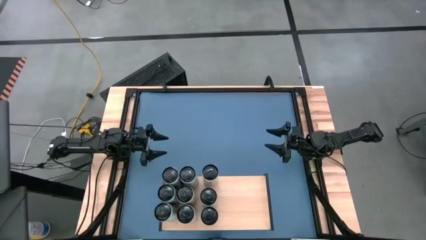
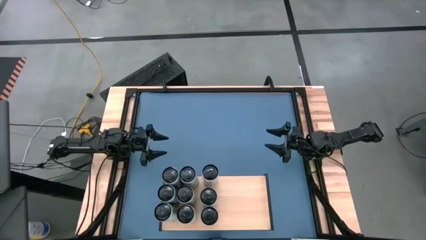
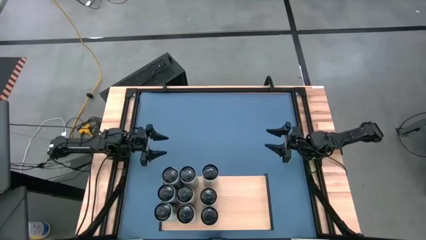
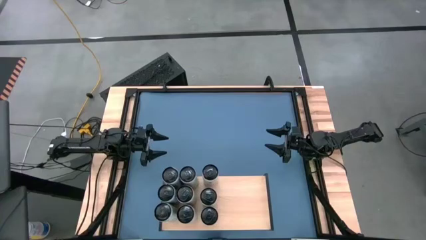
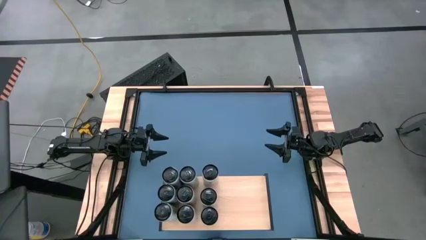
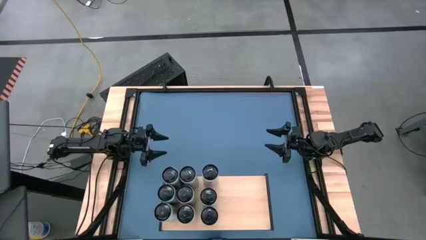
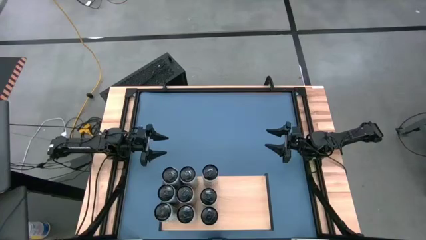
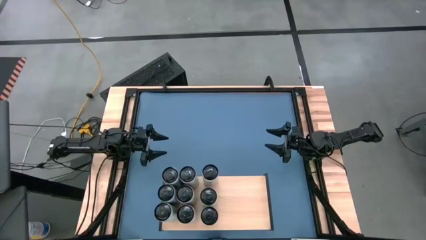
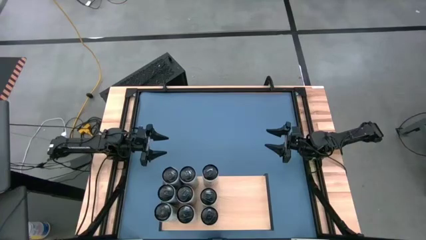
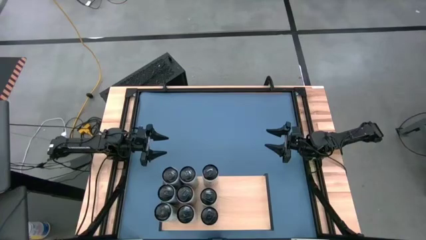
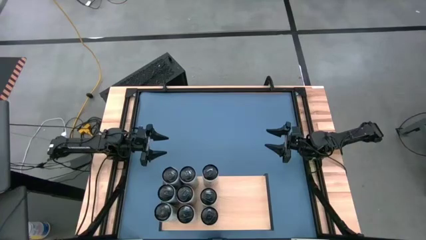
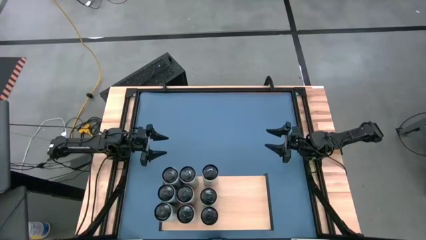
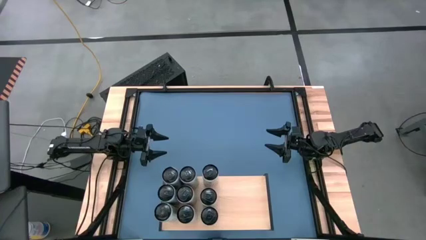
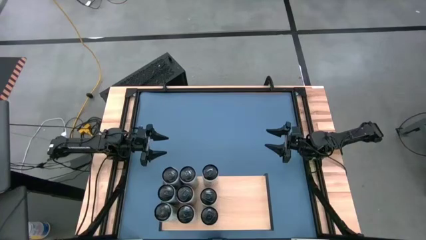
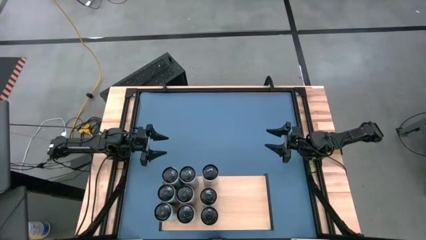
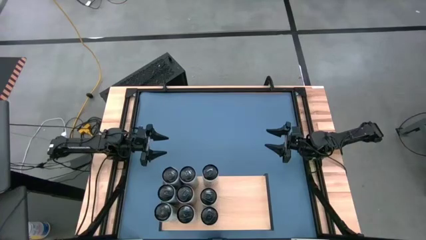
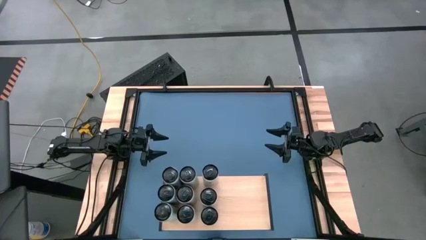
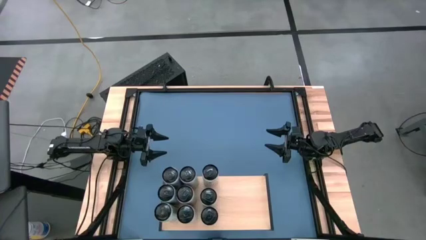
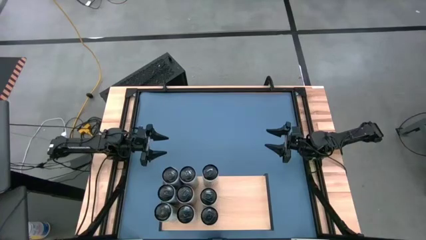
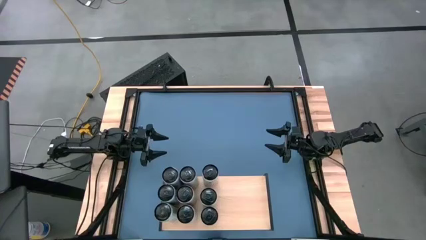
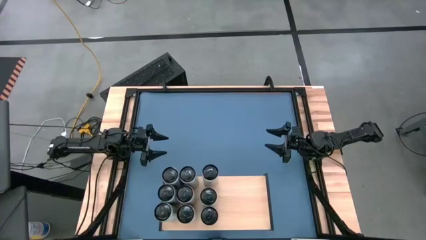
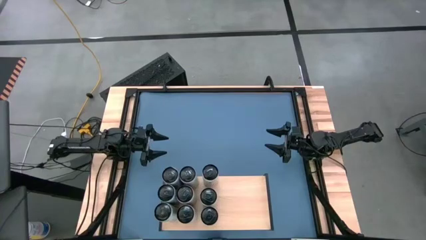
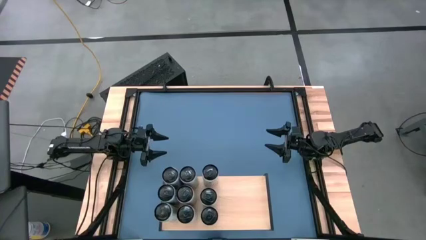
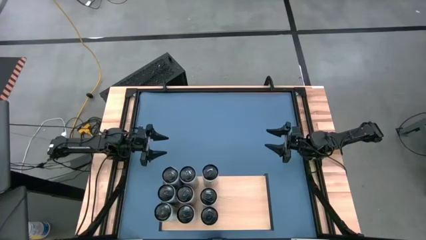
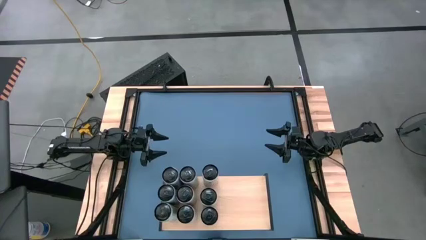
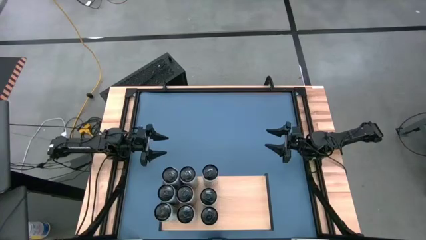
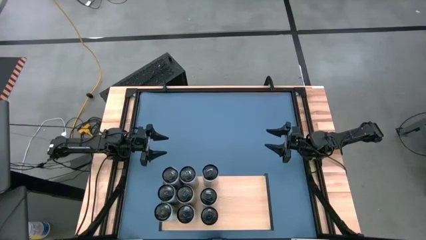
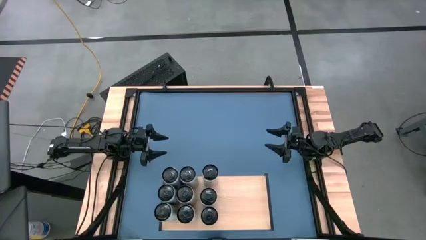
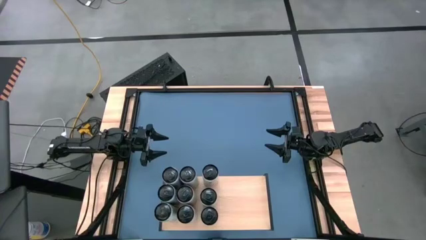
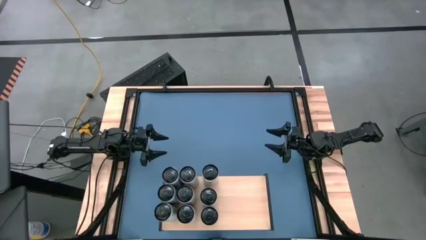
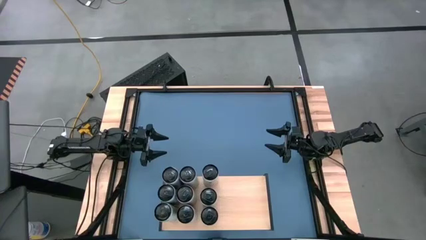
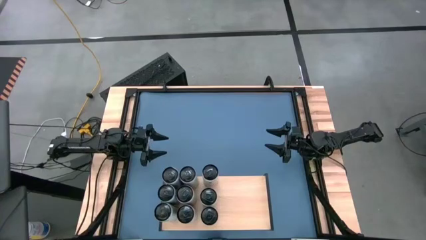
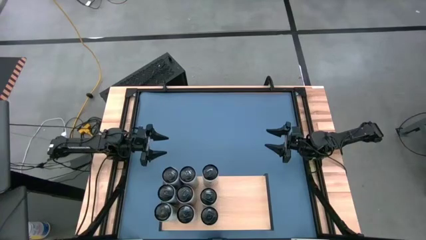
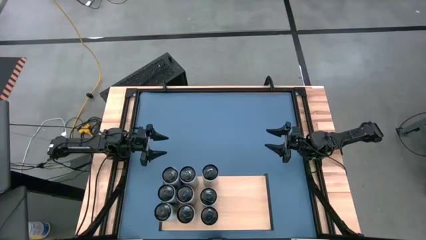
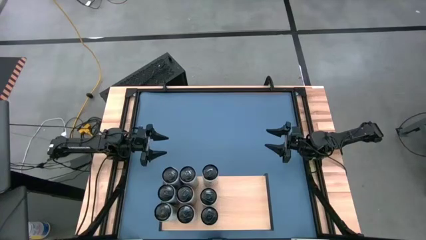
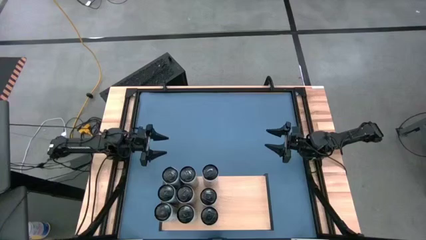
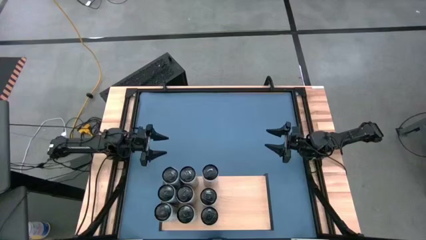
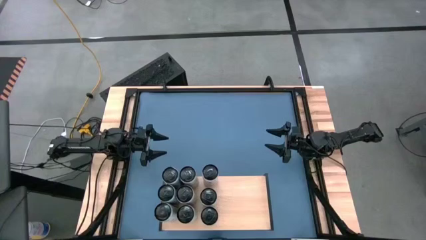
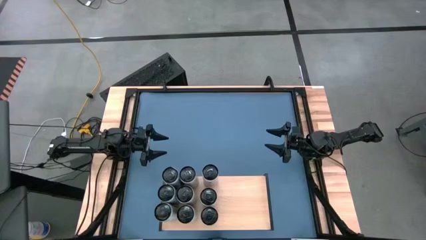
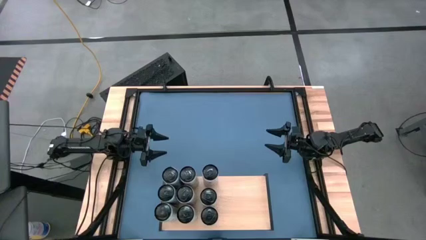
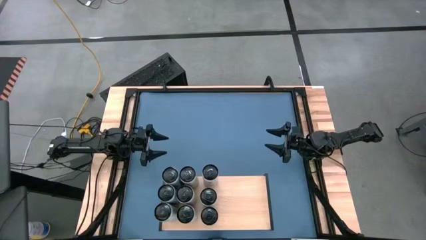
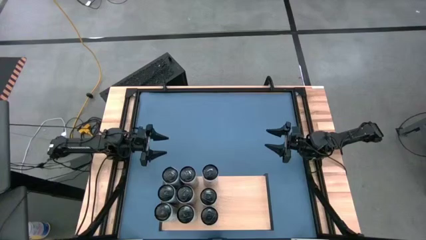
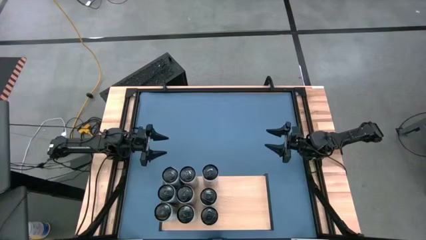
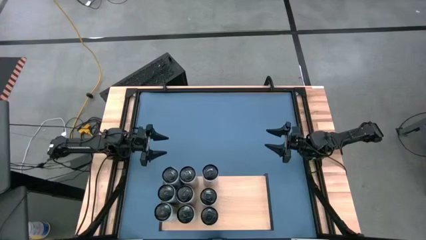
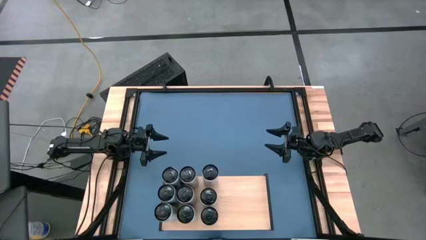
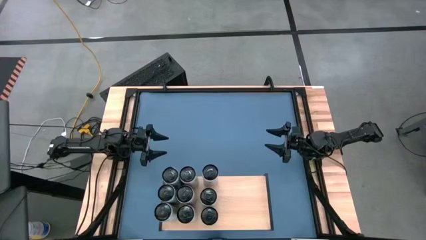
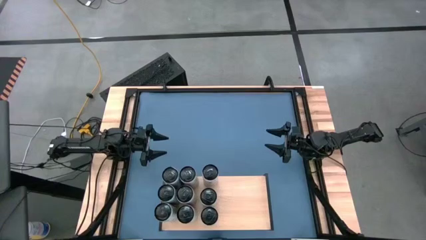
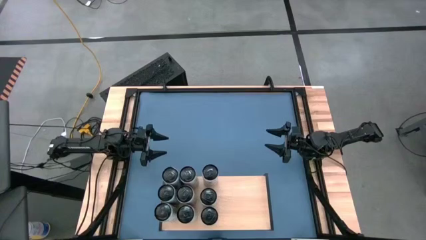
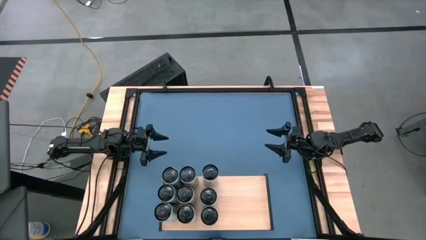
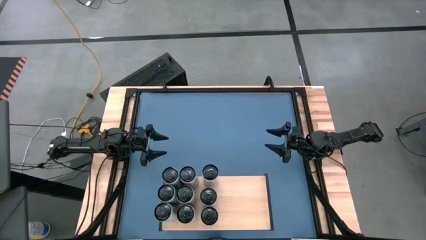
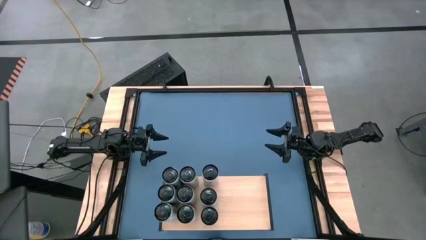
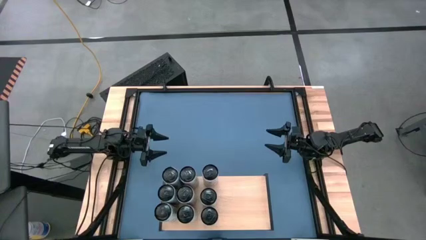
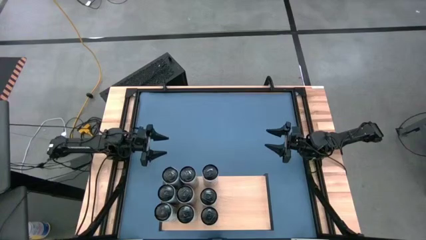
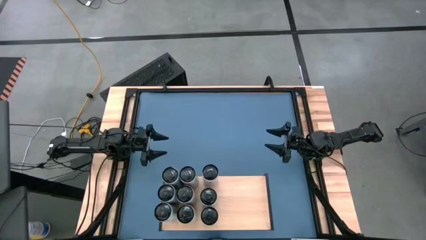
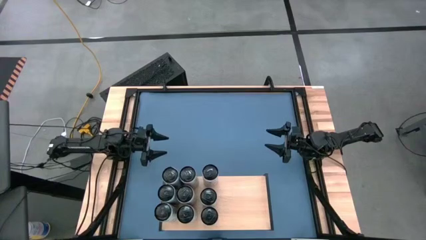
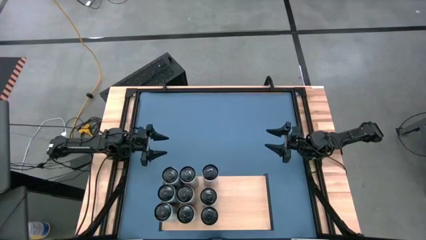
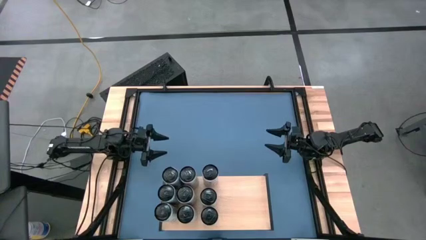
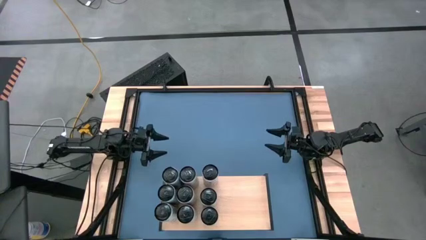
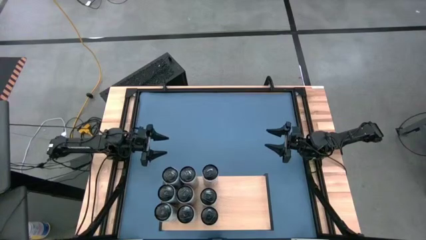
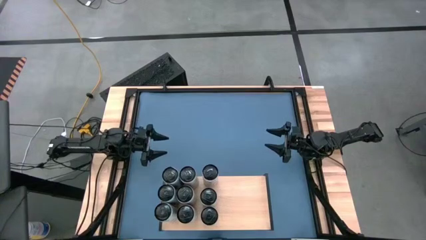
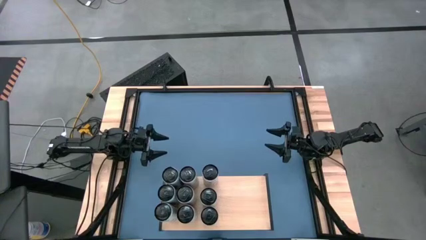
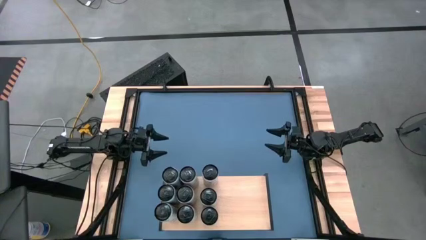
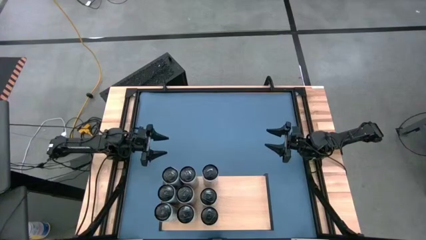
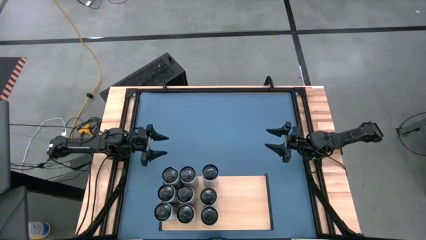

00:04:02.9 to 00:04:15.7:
Task: Place canned beverage on shelf
Return to Home Position
